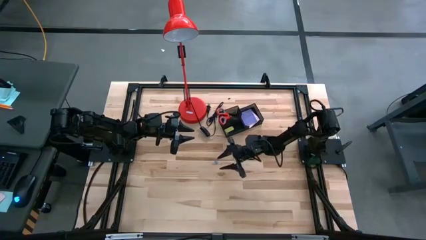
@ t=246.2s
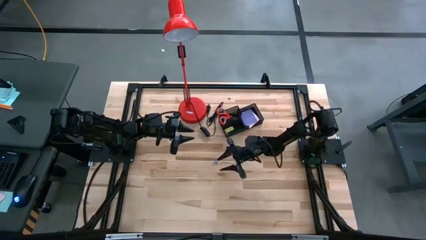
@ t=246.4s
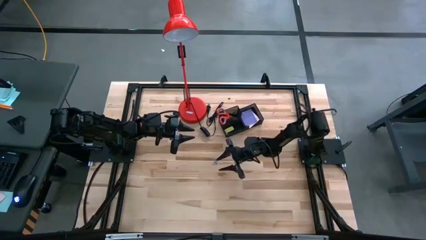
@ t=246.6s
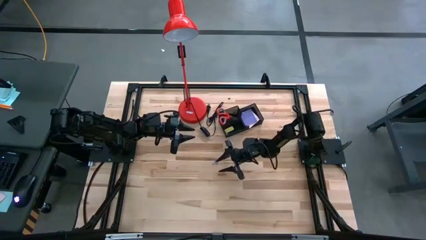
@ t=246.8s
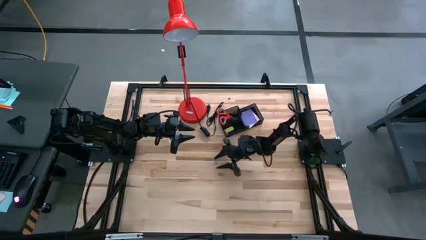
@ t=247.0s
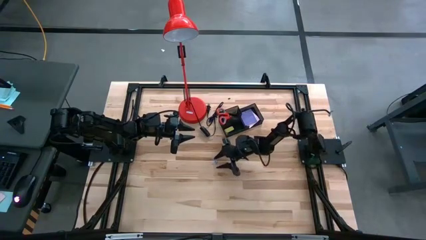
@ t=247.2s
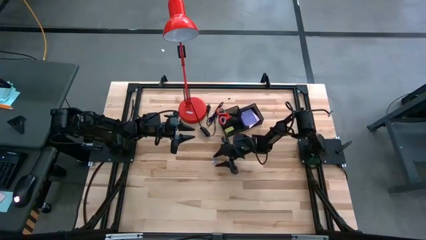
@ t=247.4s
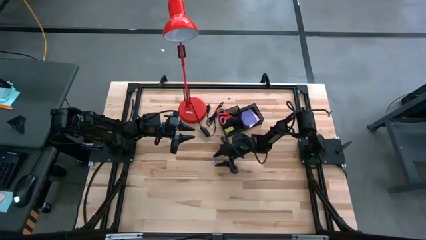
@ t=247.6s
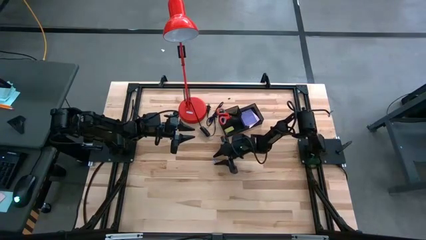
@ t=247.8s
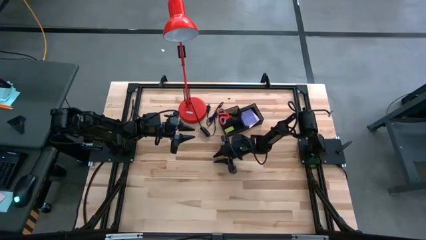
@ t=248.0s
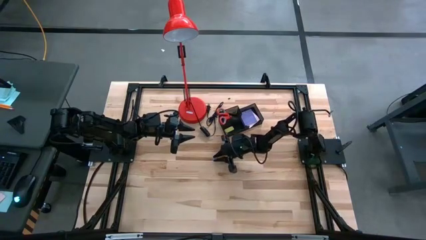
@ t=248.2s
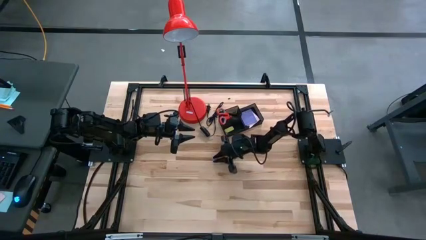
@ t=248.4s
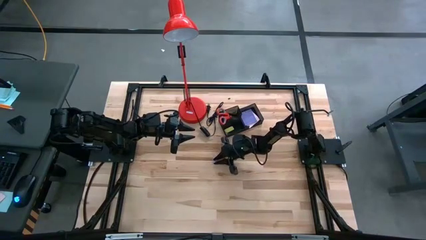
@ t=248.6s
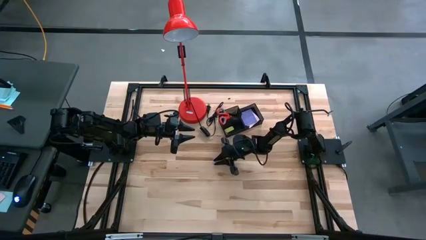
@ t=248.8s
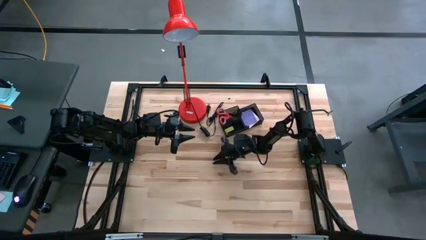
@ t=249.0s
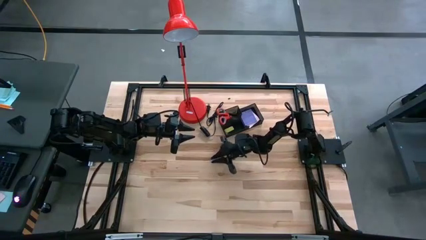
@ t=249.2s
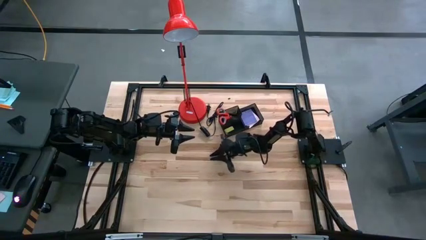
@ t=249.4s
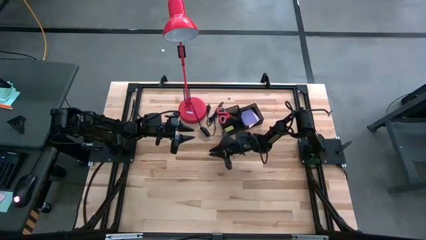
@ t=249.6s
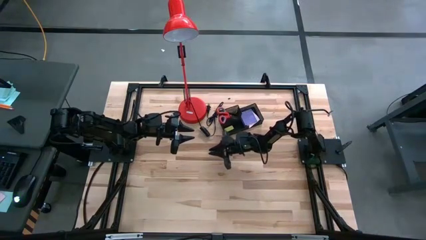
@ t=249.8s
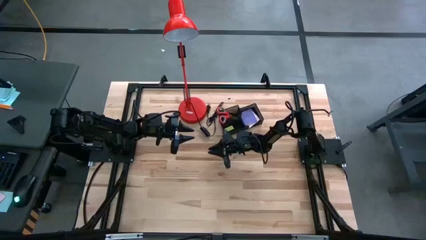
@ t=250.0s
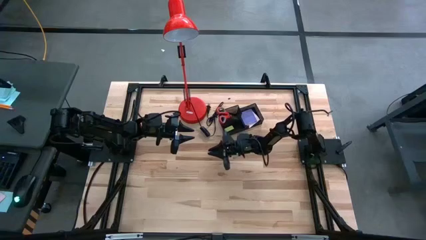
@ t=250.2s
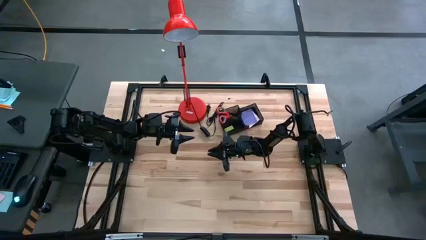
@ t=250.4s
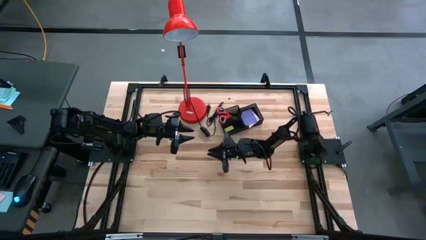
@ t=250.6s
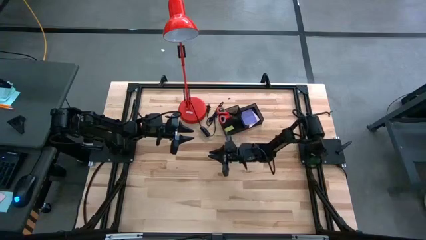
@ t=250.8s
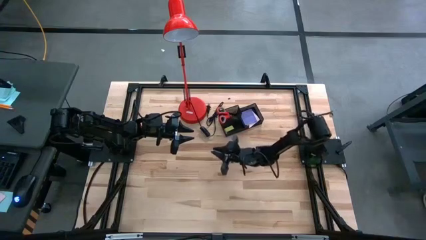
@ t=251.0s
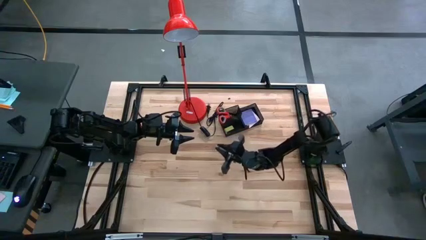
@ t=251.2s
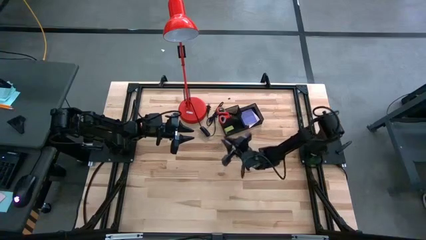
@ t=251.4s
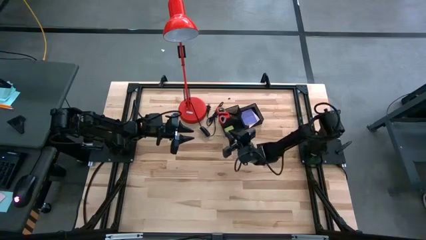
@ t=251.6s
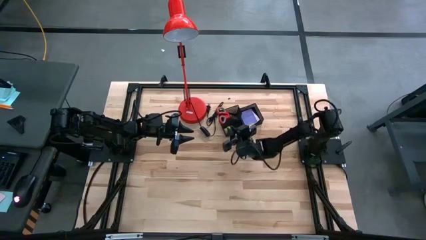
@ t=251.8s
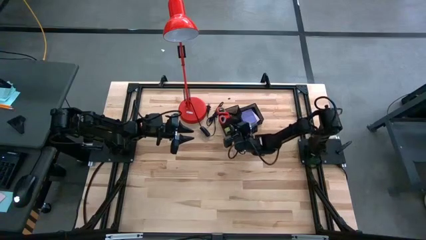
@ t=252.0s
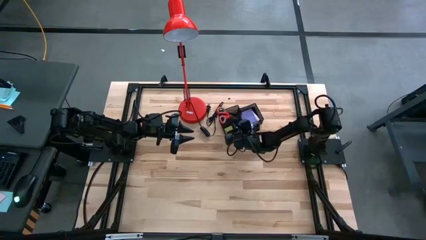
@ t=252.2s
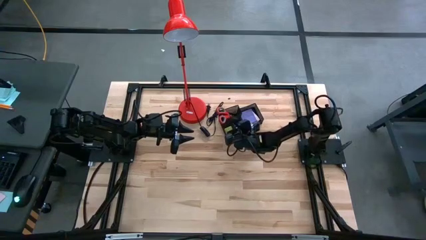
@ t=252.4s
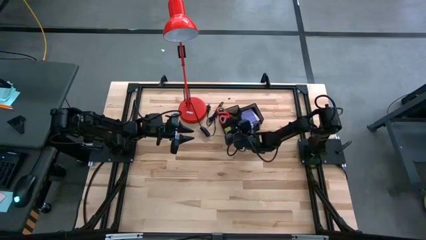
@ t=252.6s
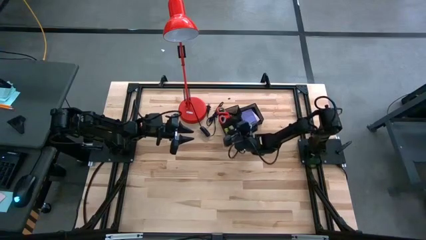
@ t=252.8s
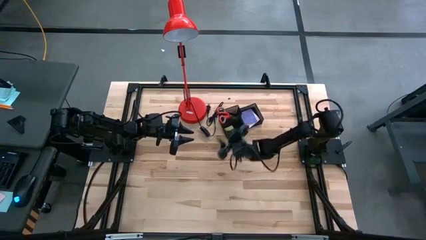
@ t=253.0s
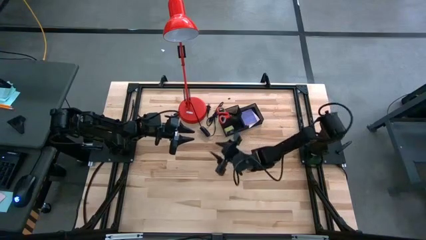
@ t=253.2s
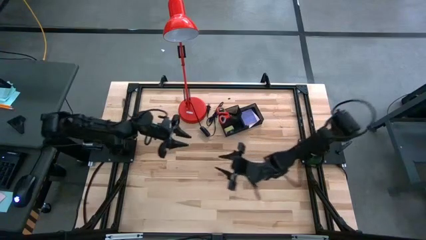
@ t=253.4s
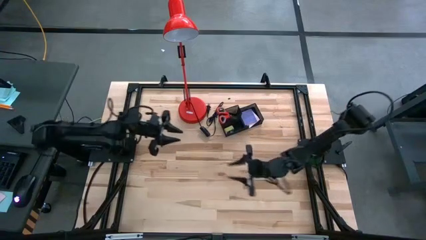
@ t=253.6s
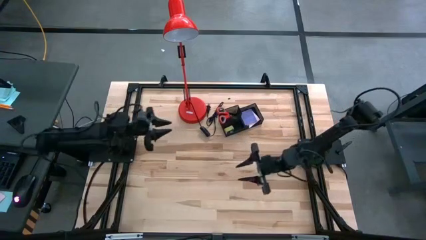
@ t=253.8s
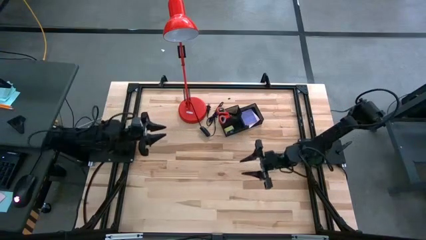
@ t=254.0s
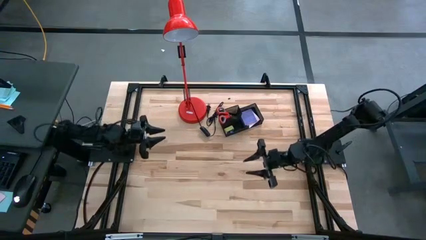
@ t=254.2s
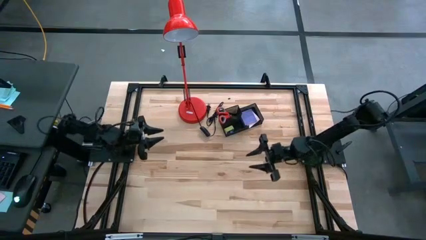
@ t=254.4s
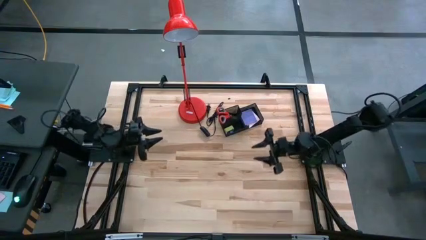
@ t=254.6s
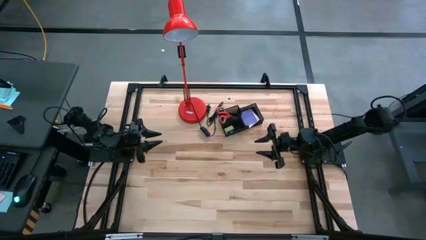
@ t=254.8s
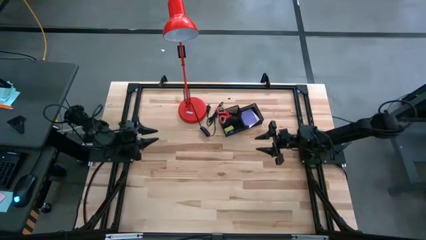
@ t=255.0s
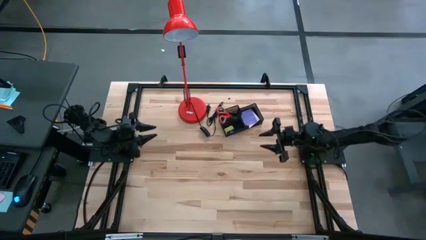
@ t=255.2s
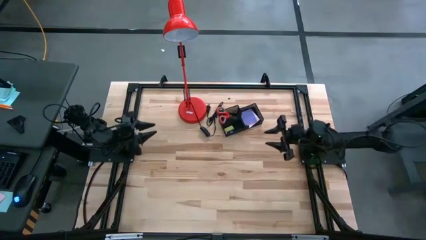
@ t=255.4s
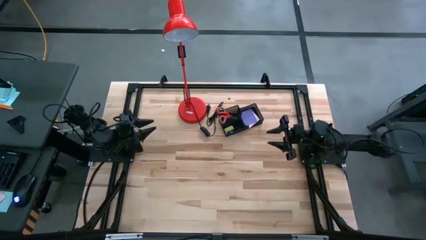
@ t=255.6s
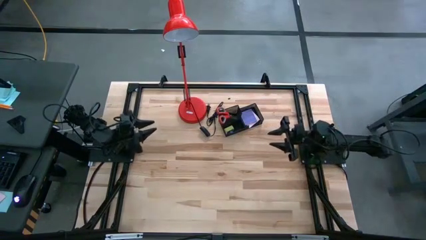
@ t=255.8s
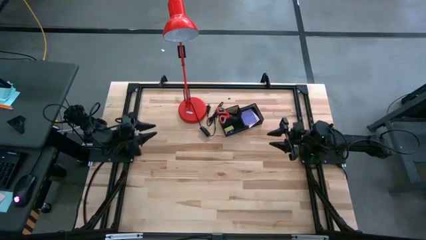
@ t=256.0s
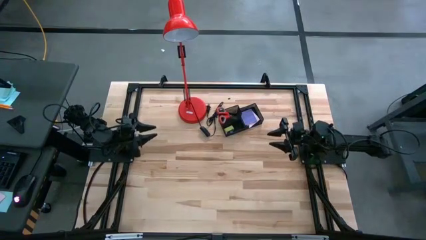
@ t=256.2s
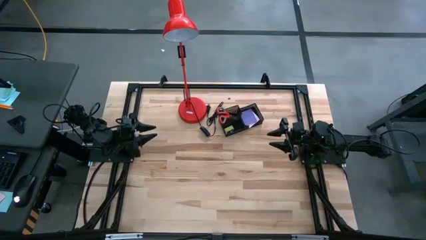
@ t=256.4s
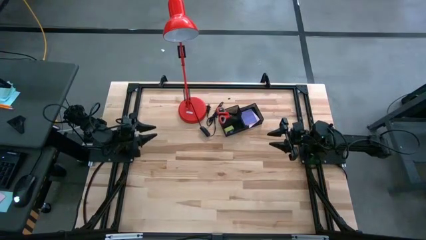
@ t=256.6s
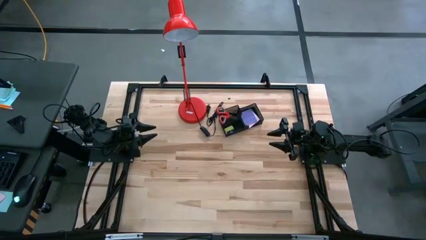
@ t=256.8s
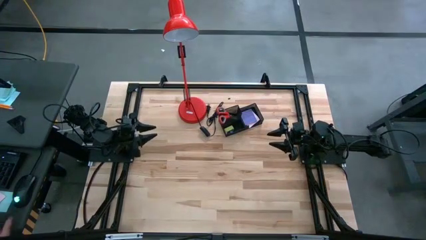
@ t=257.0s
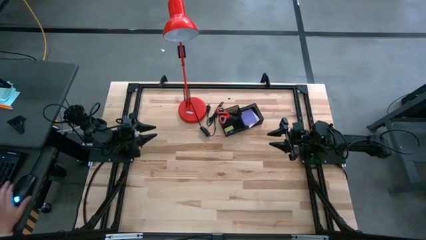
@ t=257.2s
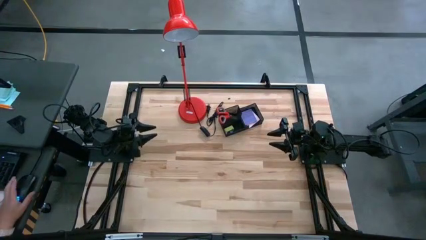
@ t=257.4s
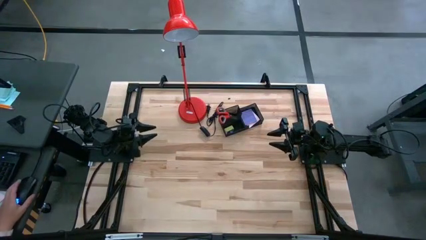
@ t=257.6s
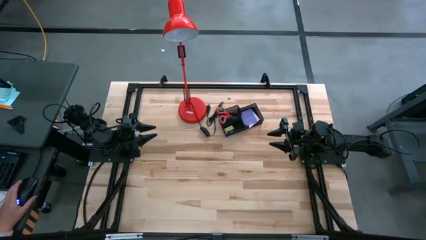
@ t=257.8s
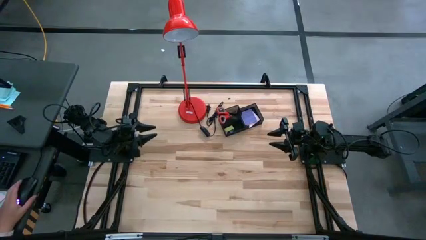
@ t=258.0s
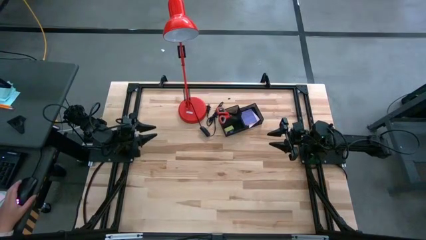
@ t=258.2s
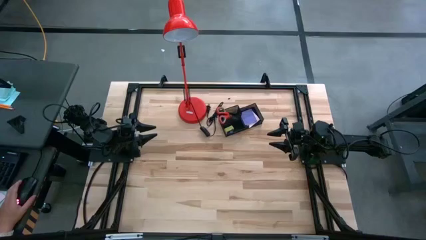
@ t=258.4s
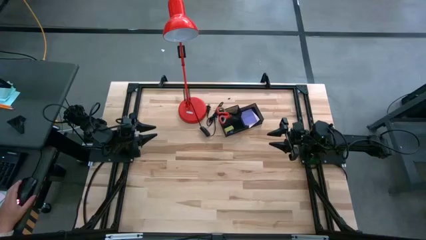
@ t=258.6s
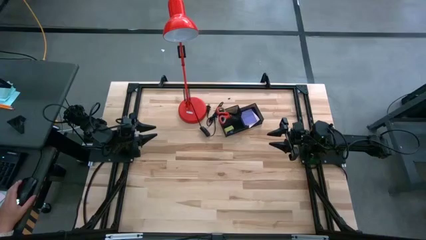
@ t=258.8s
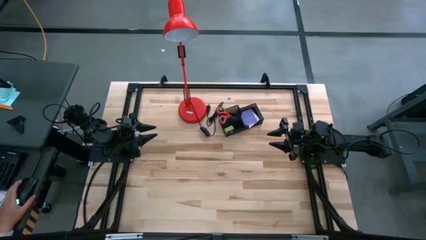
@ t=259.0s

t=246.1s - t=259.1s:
Task: Pick and place office supplies into organizer
Return to Home Position
